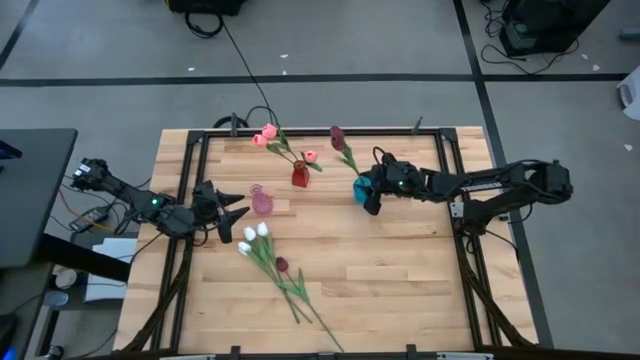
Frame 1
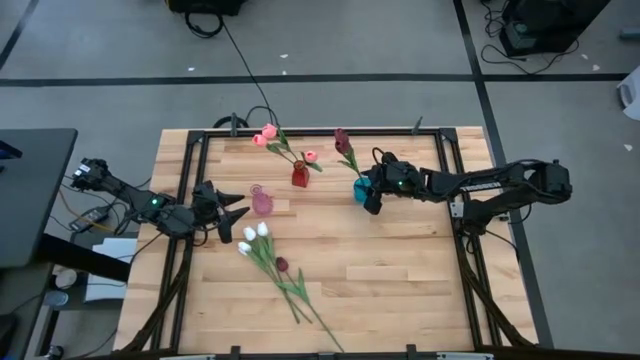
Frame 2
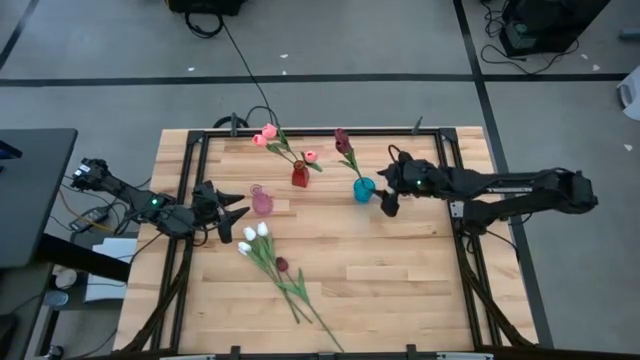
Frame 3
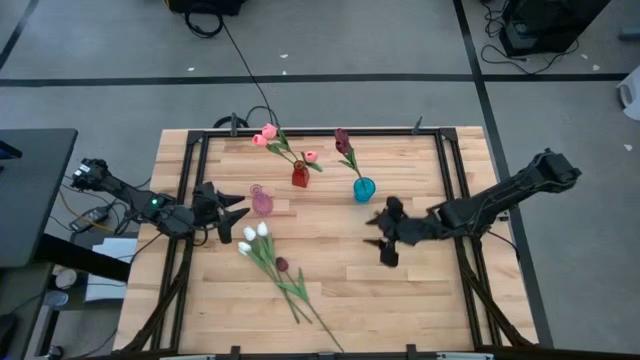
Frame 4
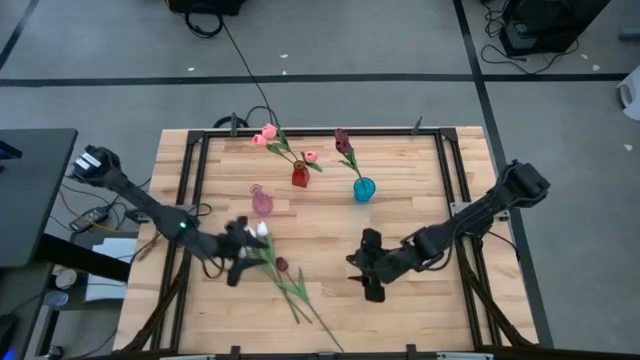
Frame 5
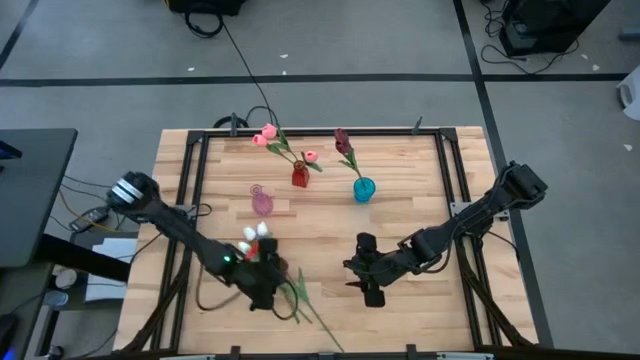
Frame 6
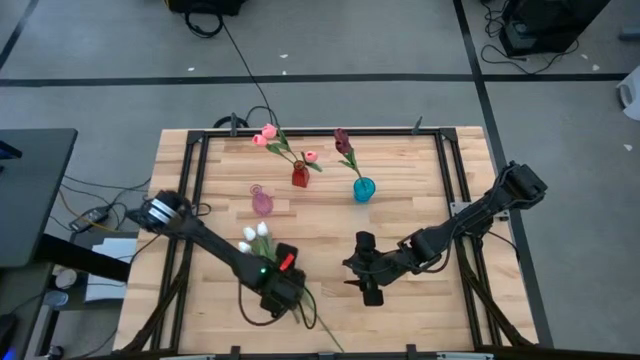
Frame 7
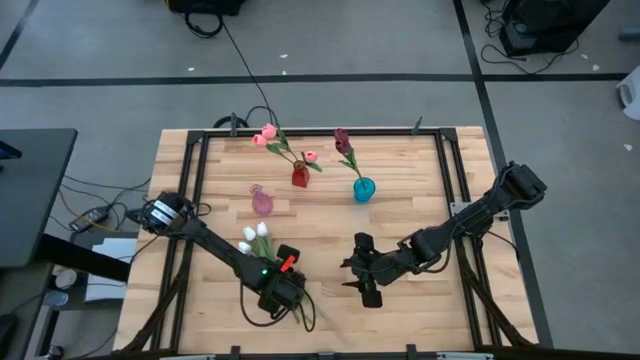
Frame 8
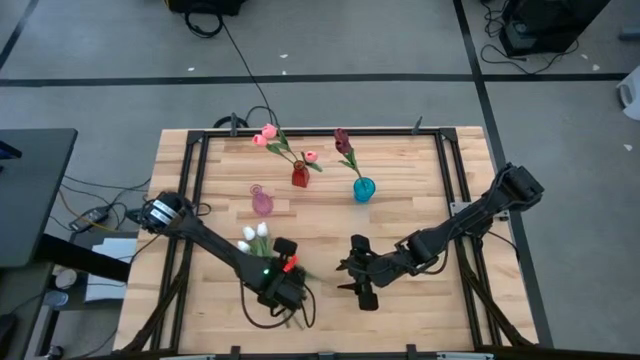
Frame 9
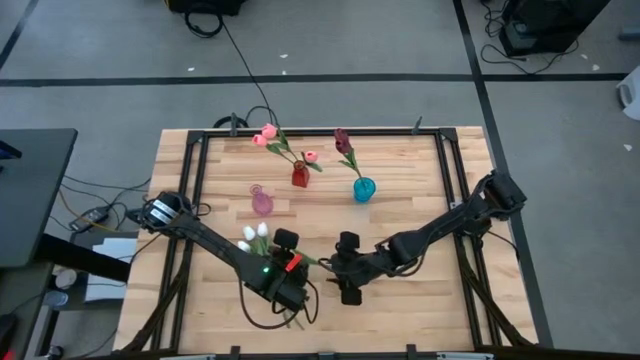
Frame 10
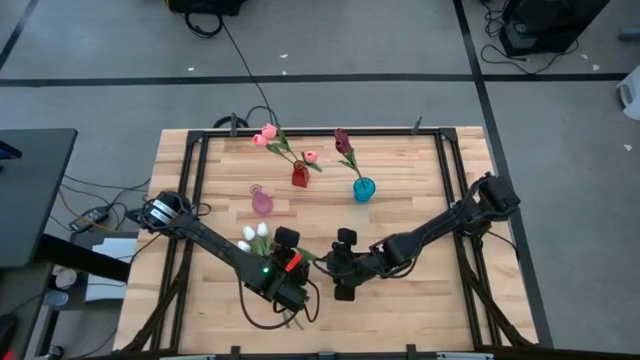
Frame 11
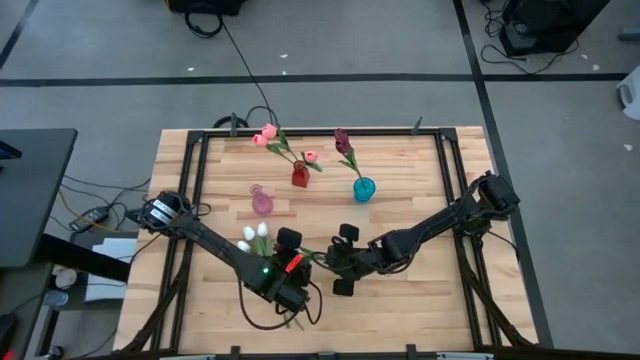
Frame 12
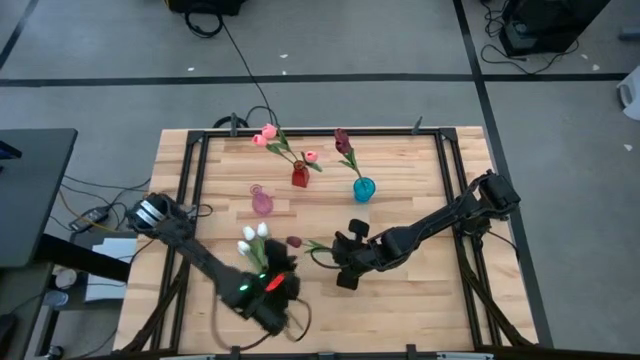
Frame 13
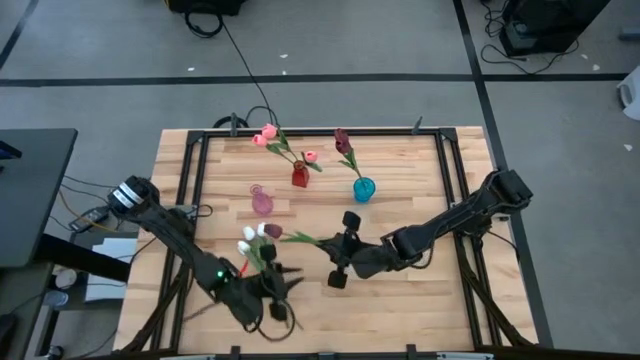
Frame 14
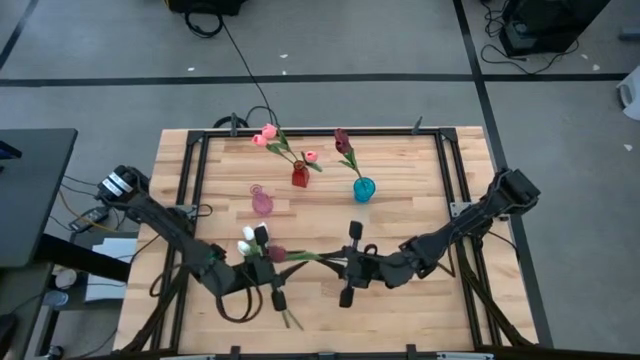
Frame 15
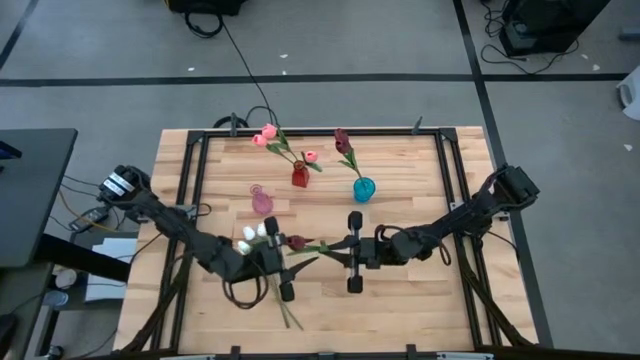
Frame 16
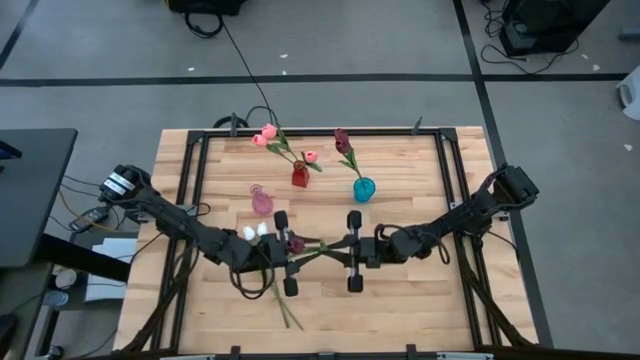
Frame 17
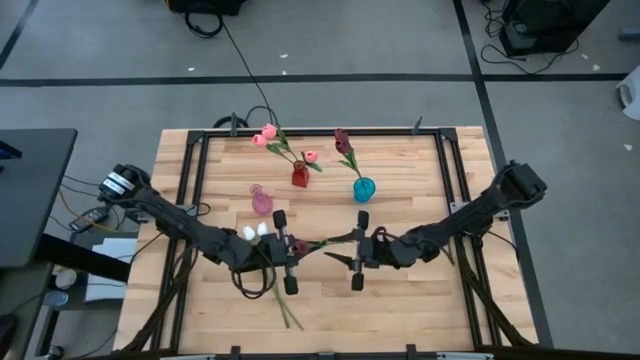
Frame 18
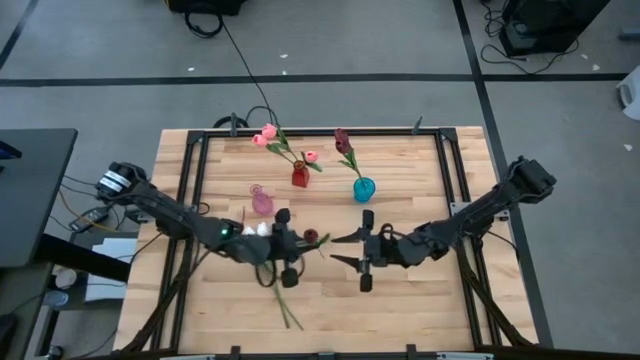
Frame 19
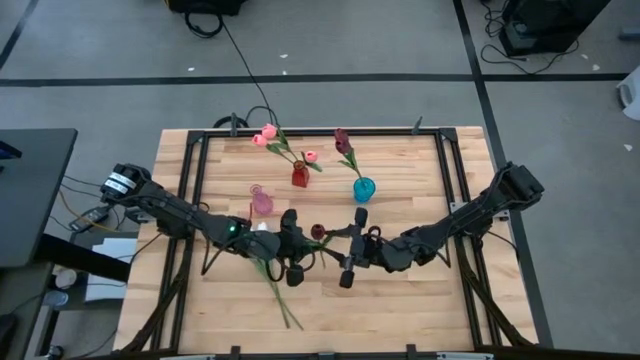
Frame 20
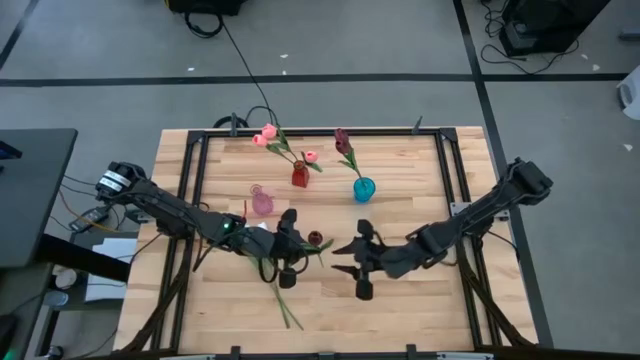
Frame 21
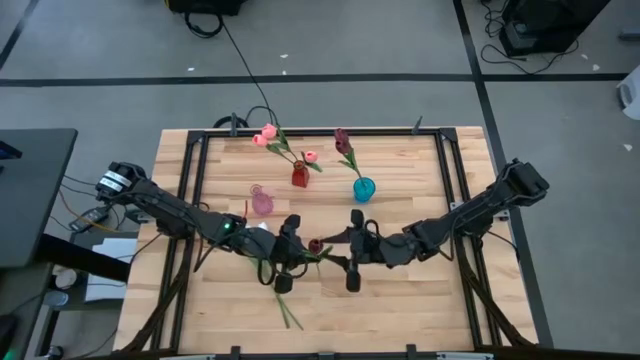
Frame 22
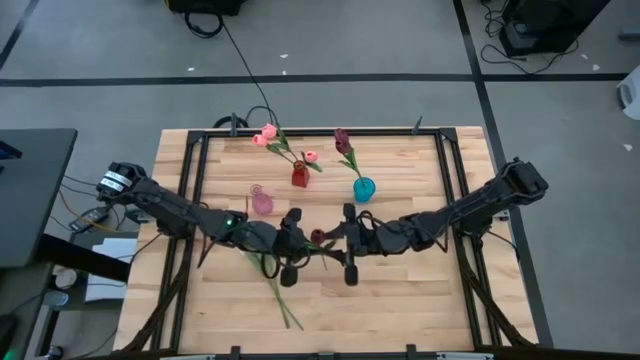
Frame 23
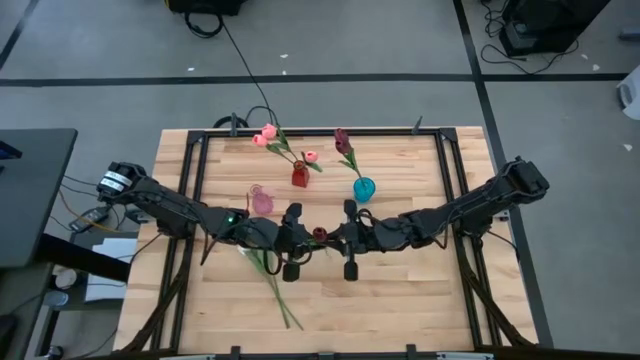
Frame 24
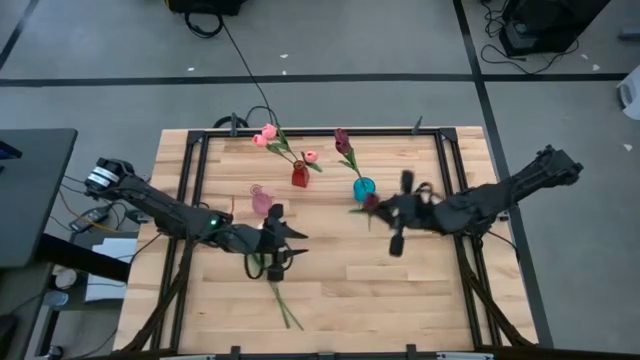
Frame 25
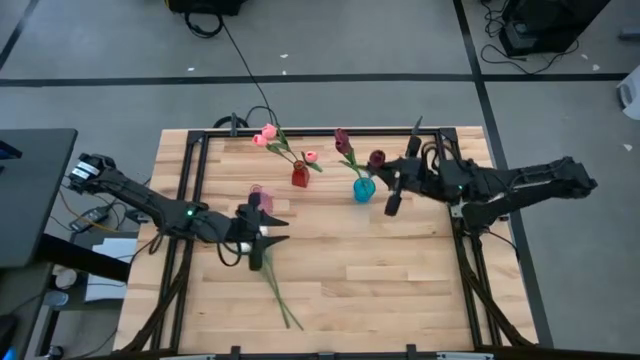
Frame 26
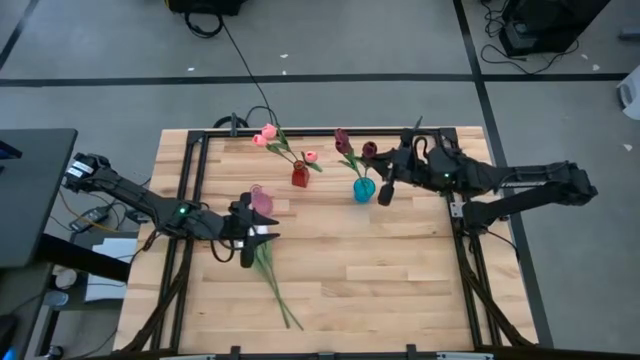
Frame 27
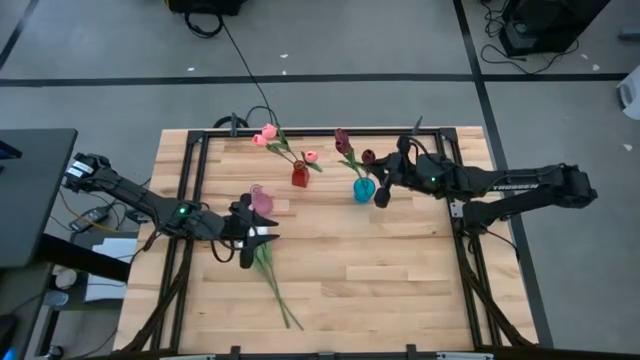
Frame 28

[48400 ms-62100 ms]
Task: Sort flowers into vase by color
Put the dark red tulip into the blue vase

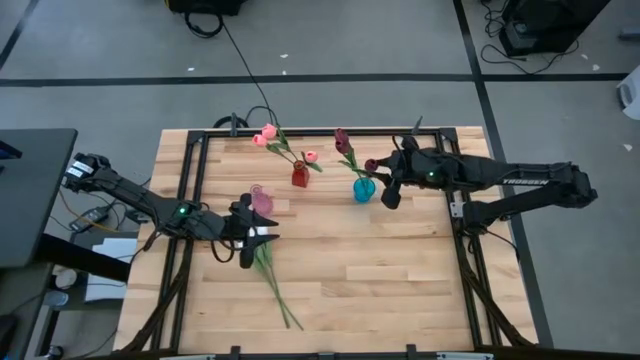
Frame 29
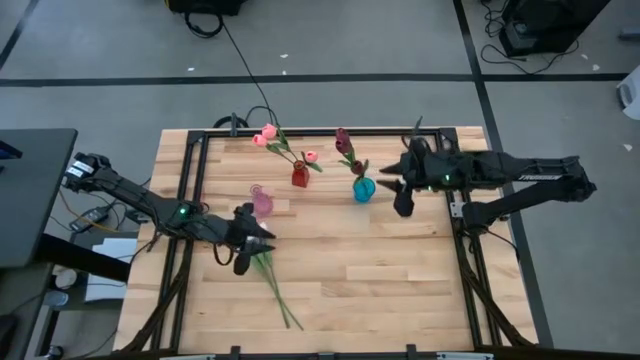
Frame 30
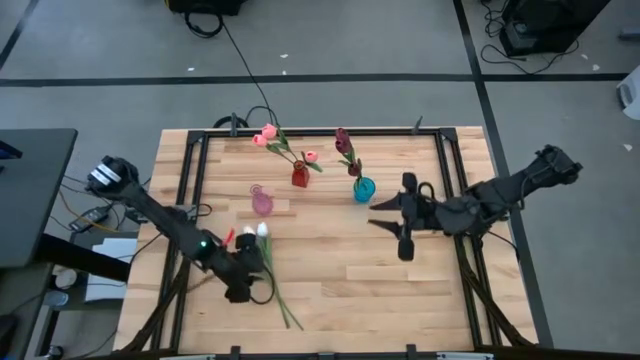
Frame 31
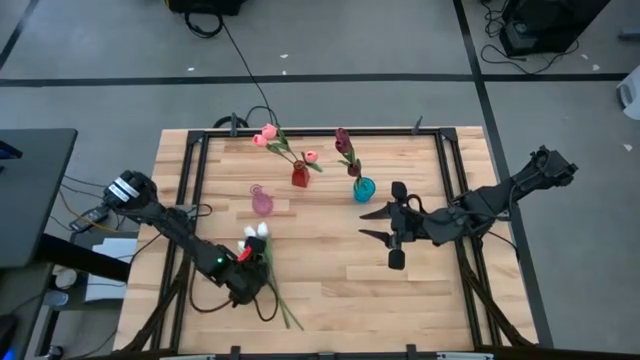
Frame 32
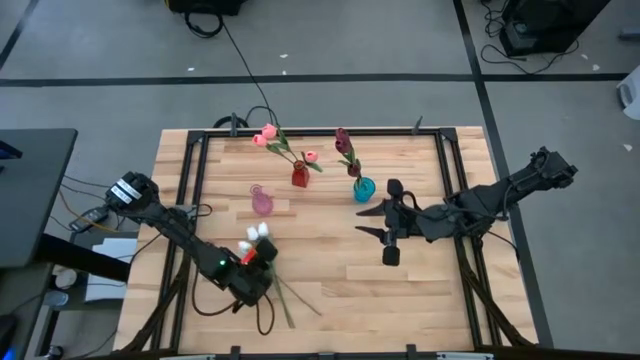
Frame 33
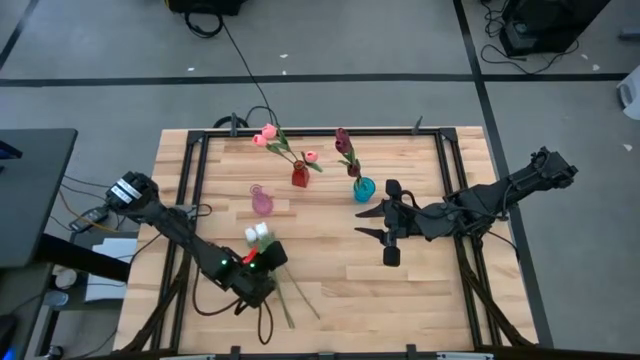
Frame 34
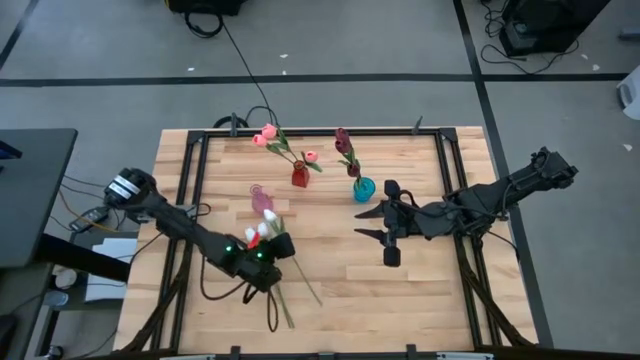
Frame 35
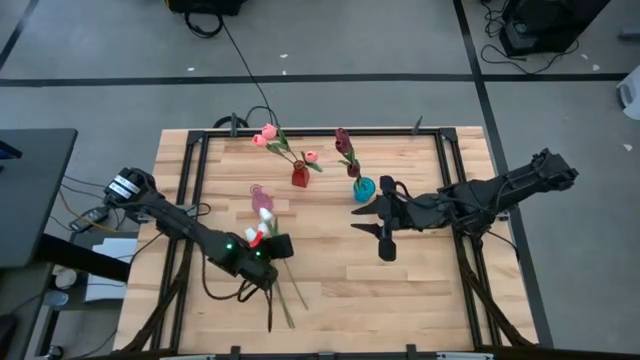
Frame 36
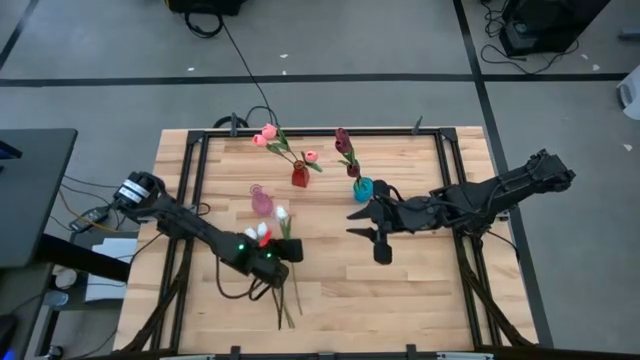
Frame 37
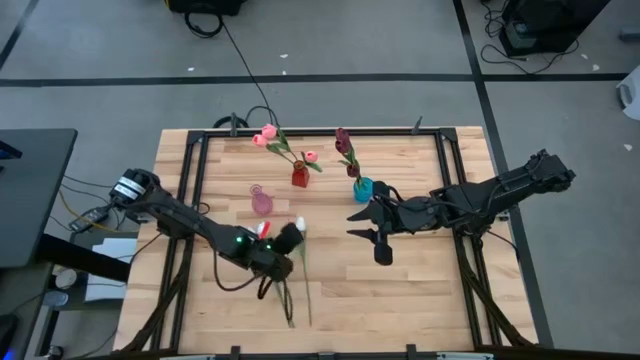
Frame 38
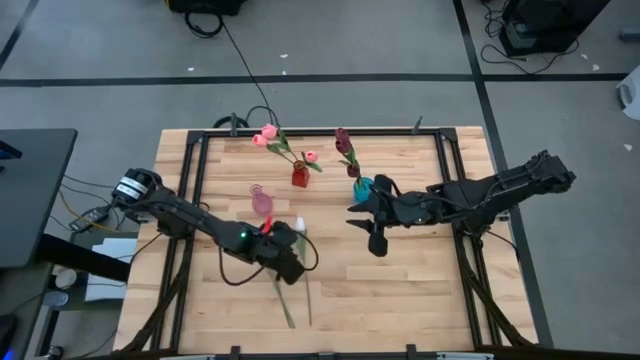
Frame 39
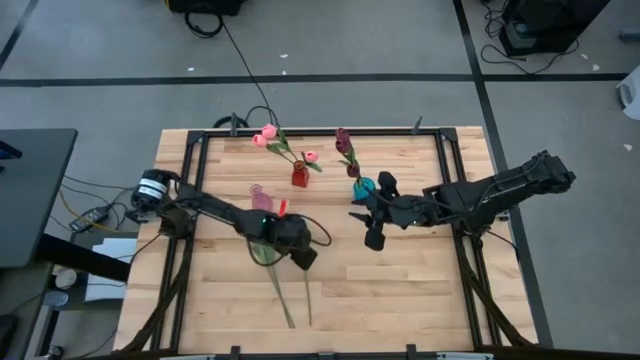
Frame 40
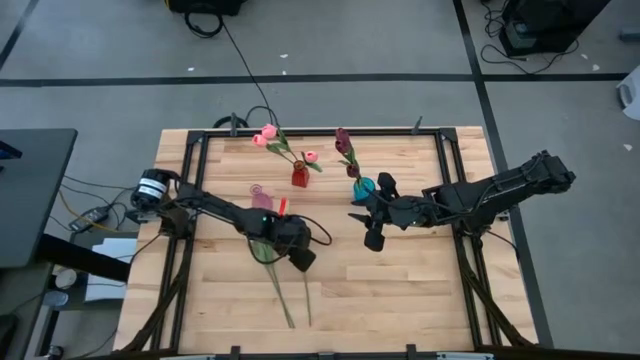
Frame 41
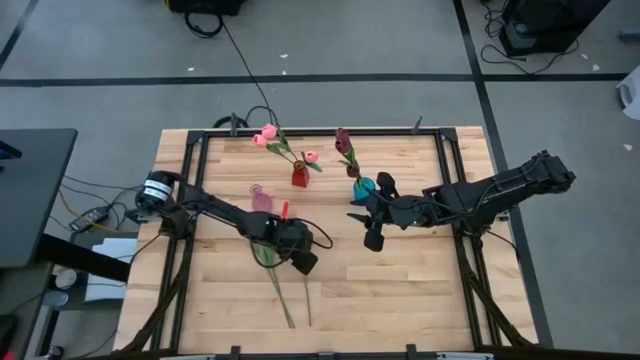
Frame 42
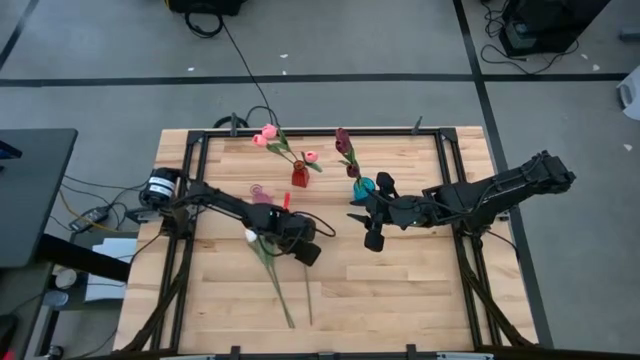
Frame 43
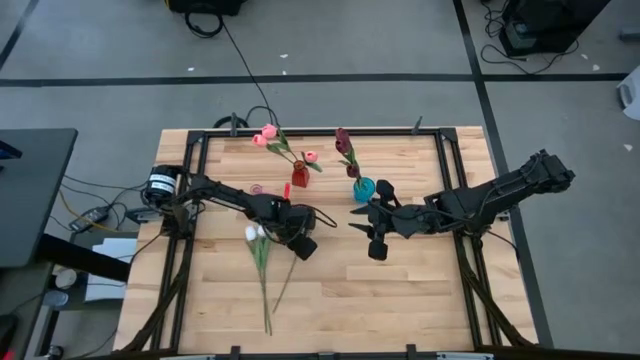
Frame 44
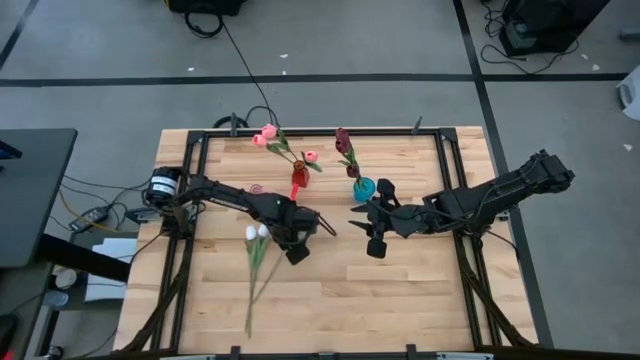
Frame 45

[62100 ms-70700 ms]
Put the white tulip into the purple vase
